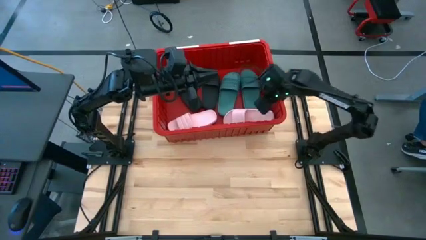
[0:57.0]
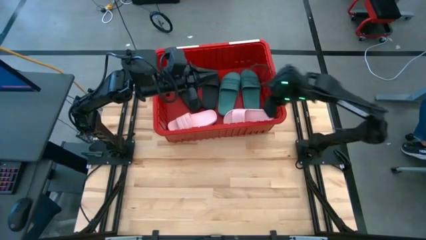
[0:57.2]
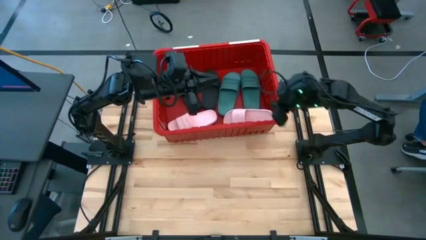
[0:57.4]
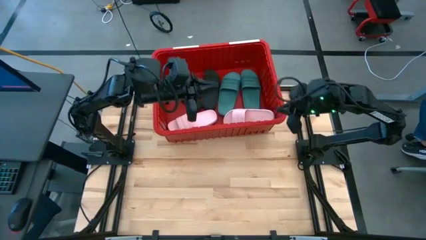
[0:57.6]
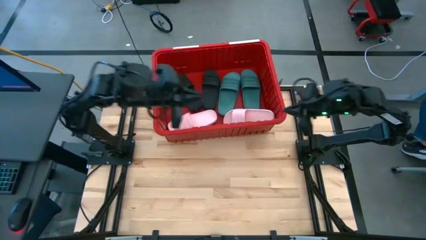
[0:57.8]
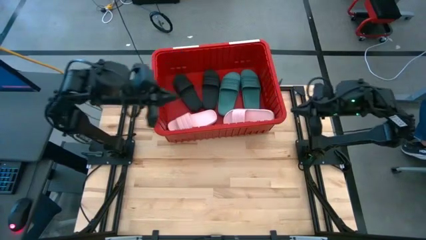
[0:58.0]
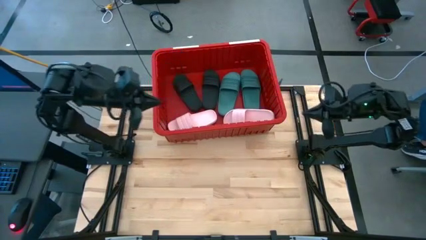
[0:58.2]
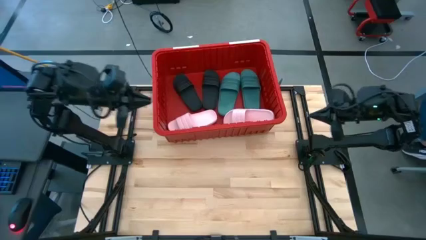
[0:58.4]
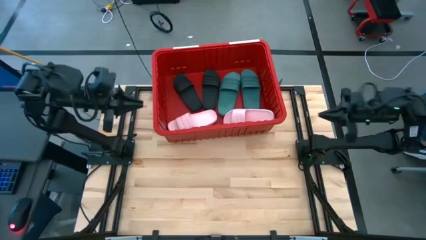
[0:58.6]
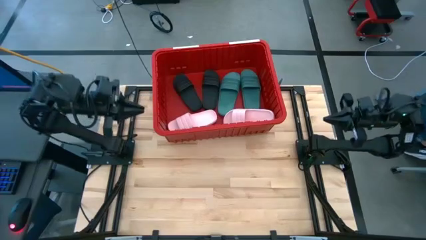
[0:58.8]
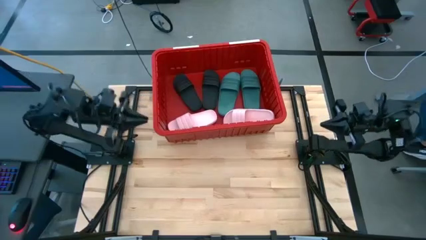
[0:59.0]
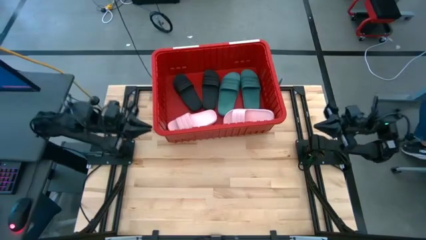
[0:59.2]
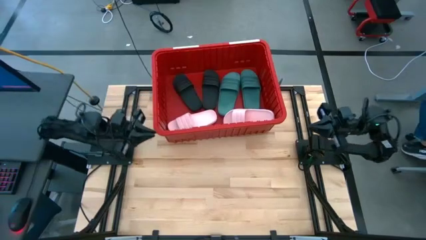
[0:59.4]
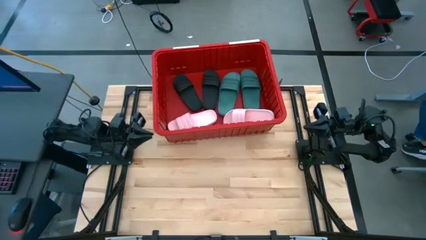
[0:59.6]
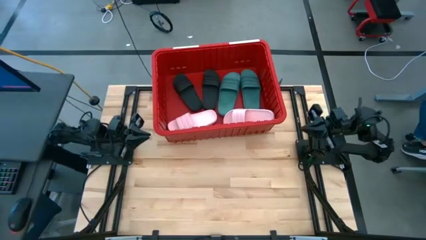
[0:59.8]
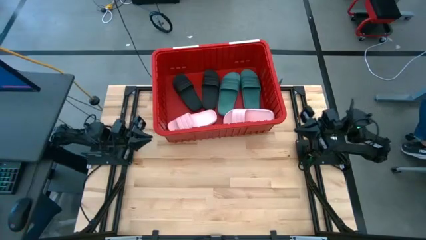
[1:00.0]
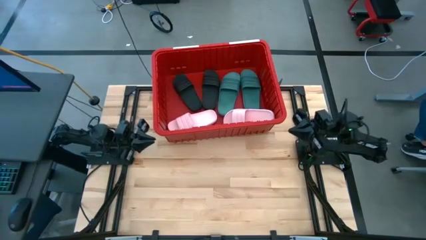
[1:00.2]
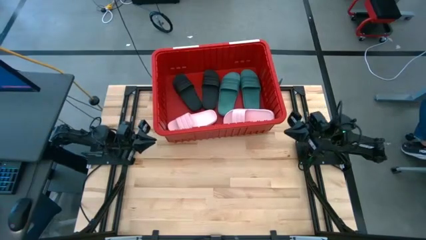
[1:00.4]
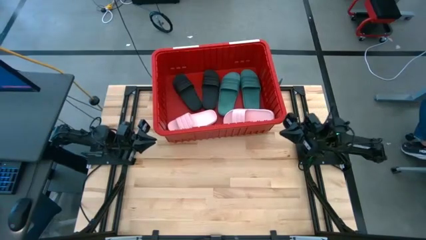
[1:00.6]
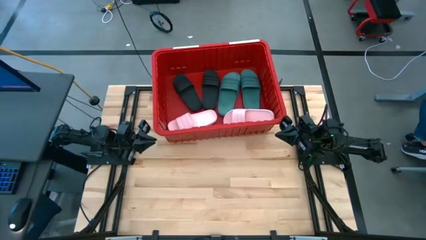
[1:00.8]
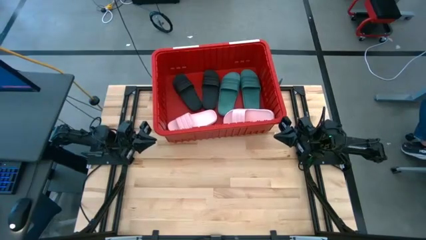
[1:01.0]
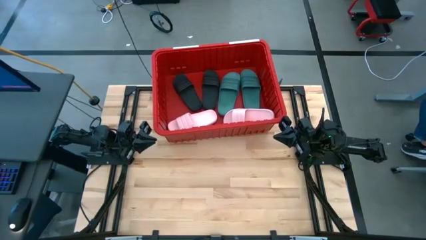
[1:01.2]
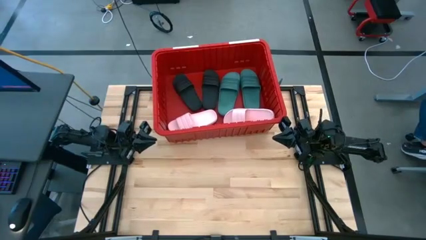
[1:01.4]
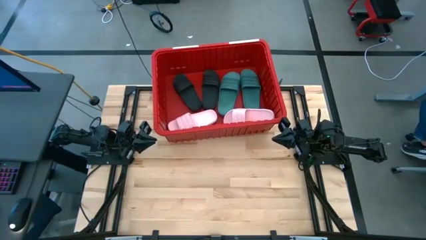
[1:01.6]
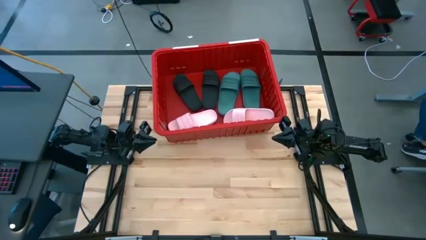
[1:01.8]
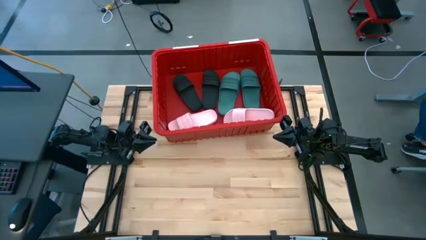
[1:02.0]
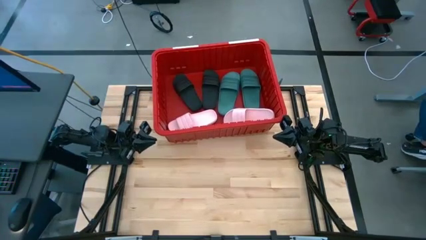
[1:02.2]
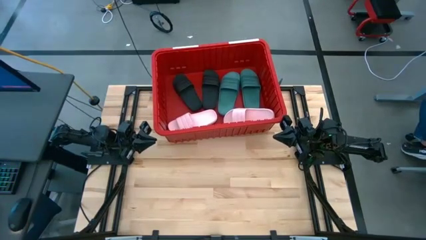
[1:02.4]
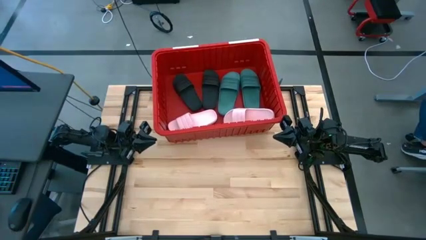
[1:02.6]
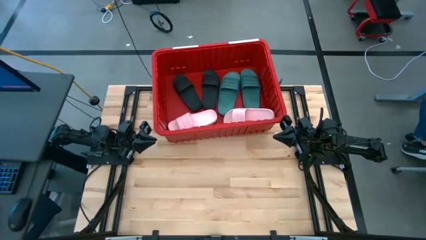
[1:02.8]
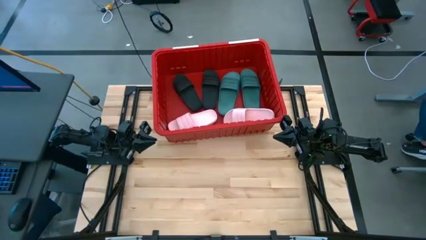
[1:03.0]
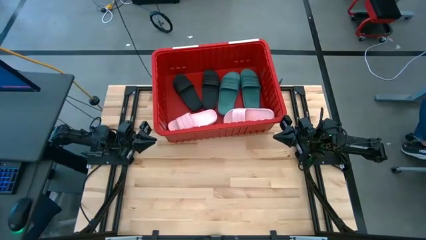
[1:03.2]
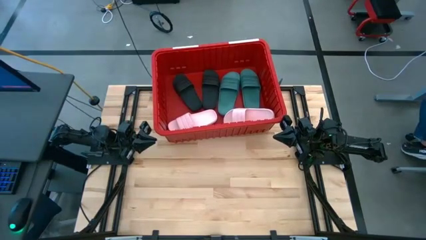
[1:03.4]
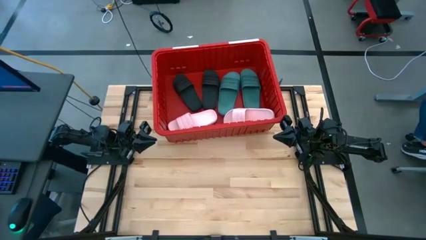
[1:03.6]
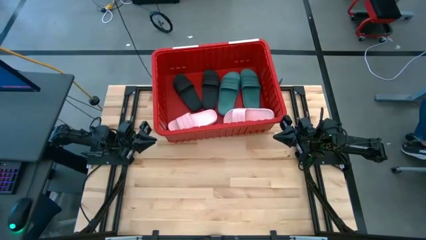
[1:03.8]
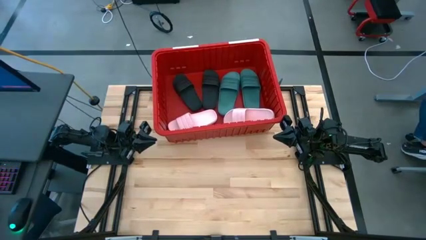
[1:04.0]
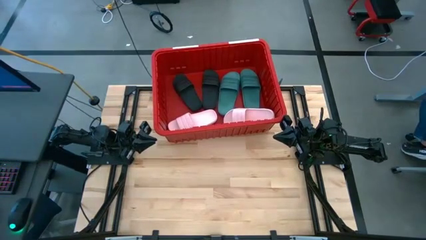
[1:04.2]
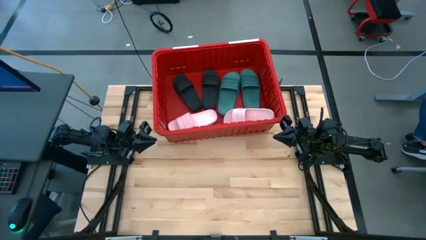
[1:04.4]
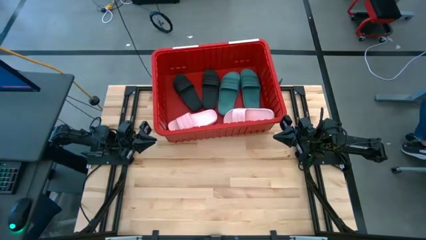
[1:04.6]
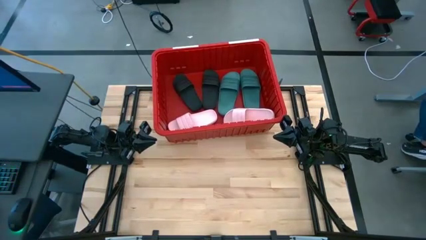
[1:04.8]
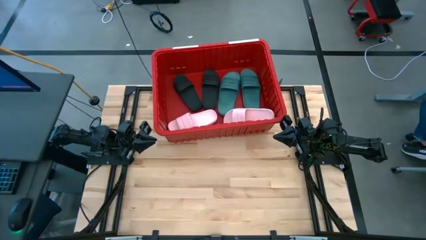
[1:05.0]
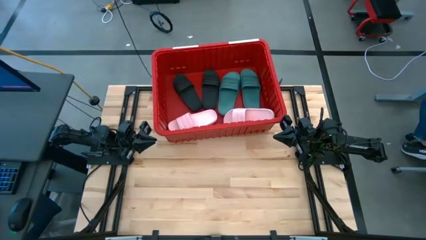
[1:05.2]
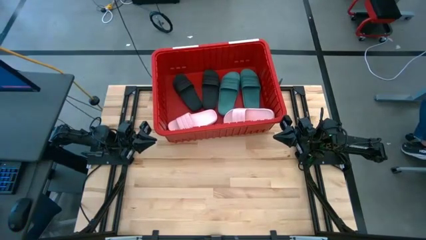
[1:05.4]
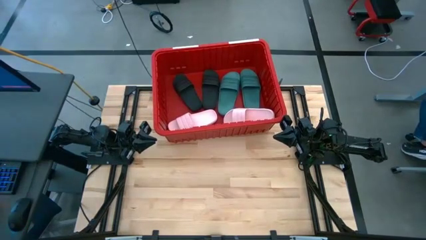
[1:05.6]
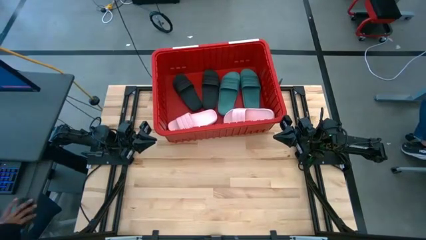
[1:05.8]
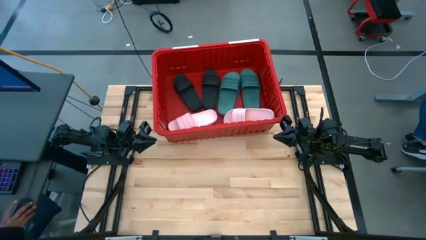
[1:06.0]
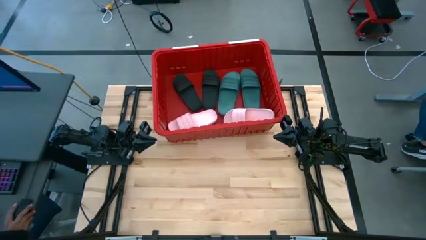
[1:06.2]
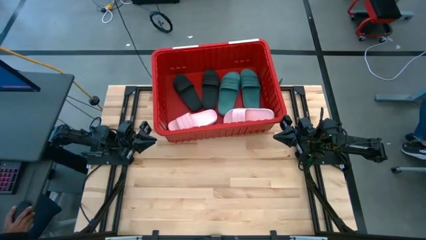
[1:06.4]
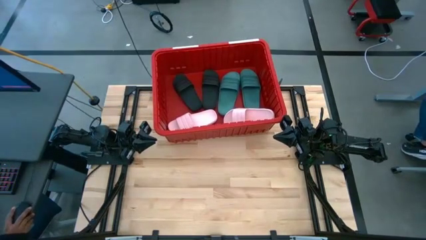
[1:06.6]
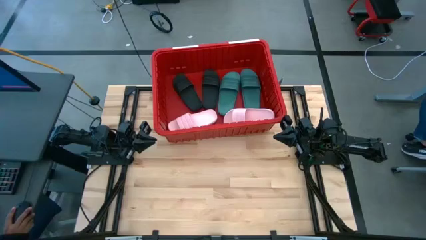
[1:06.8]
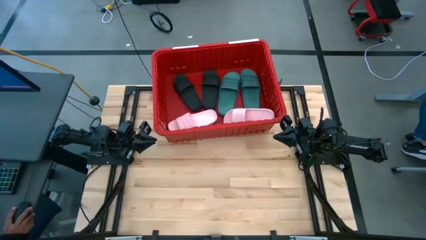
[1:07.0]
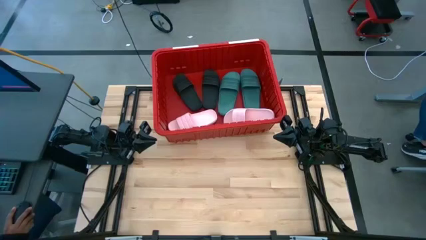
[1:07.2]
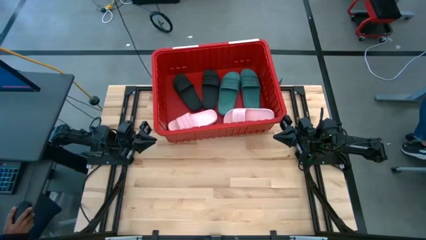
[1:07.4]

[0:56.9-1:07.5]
Task: Pick and place slides into bin
Return to Home Position

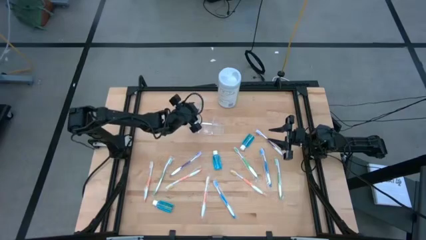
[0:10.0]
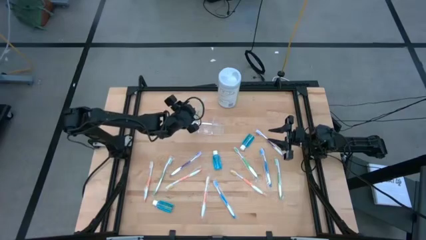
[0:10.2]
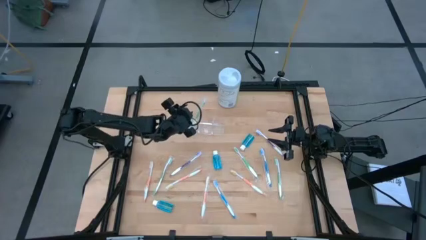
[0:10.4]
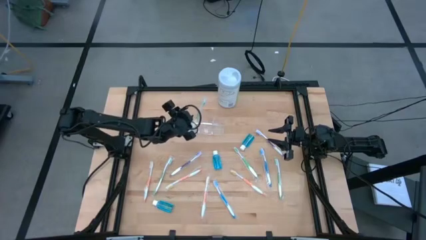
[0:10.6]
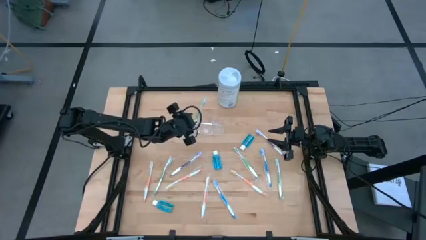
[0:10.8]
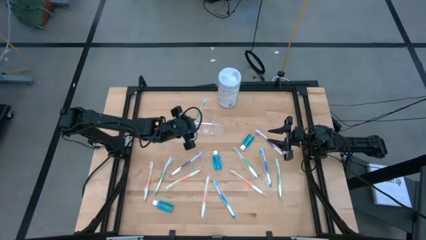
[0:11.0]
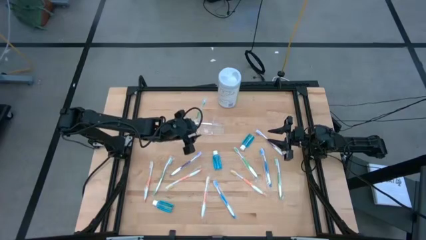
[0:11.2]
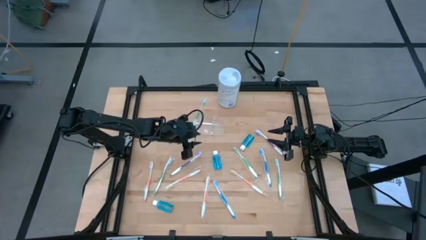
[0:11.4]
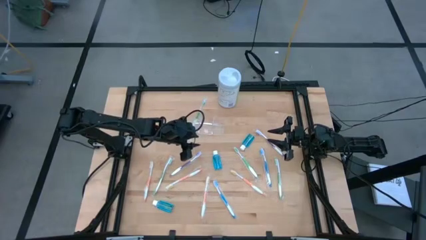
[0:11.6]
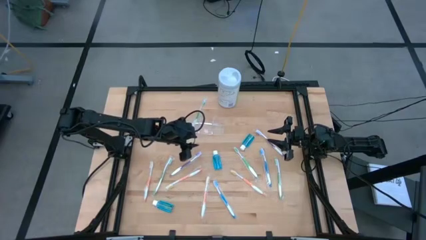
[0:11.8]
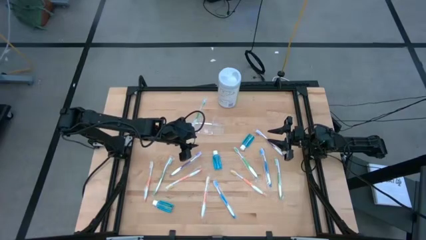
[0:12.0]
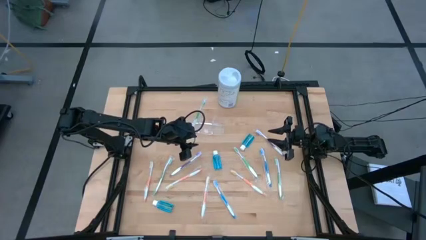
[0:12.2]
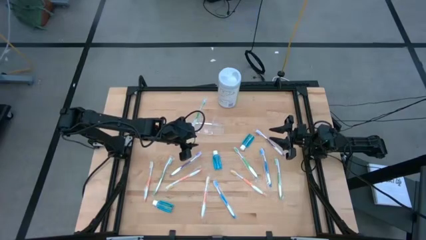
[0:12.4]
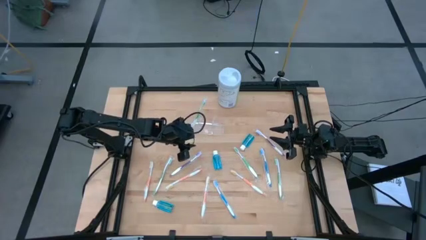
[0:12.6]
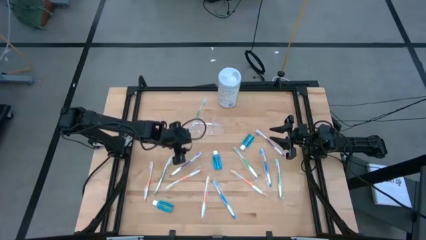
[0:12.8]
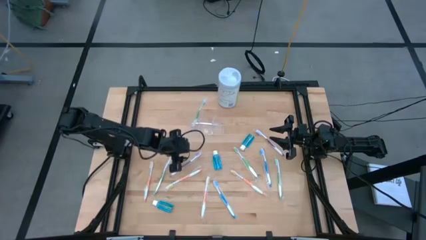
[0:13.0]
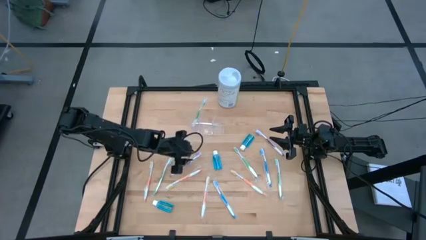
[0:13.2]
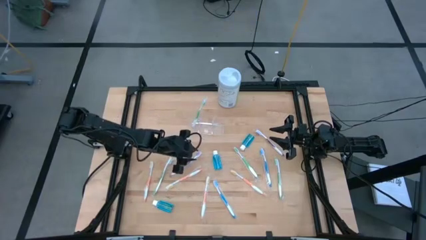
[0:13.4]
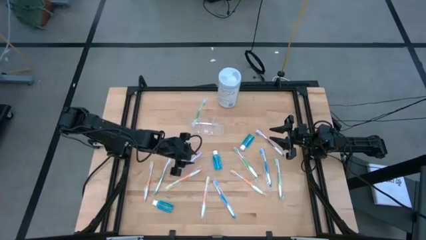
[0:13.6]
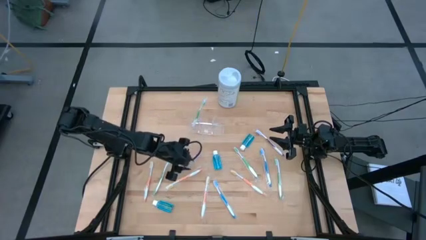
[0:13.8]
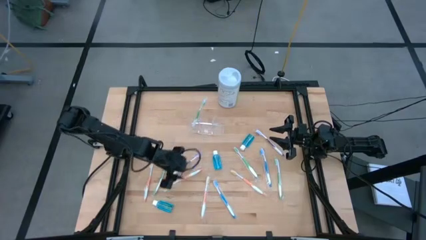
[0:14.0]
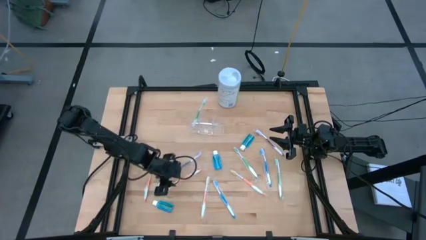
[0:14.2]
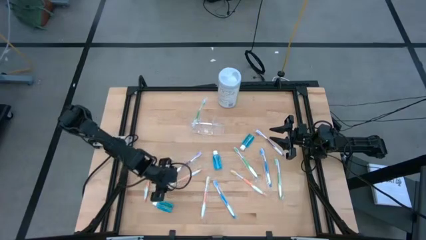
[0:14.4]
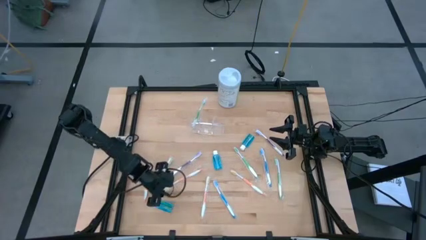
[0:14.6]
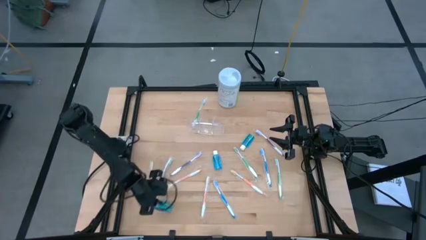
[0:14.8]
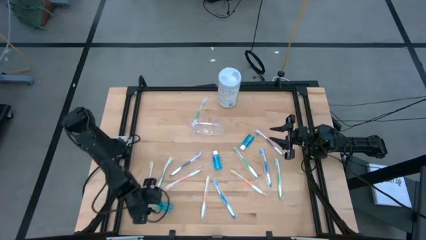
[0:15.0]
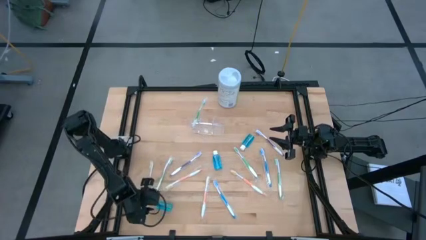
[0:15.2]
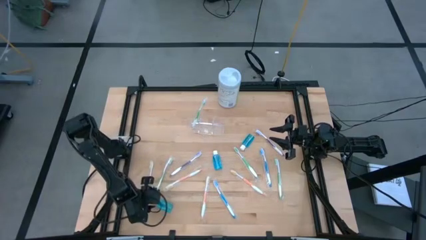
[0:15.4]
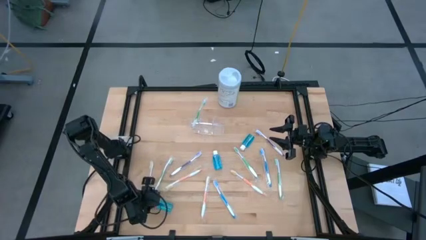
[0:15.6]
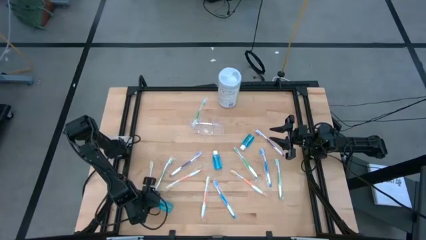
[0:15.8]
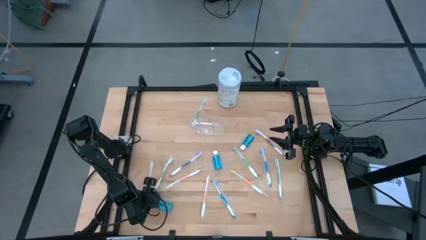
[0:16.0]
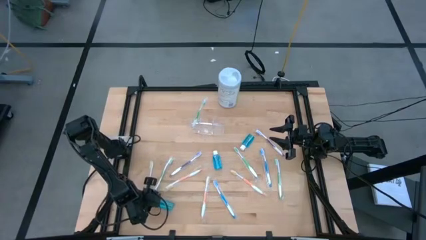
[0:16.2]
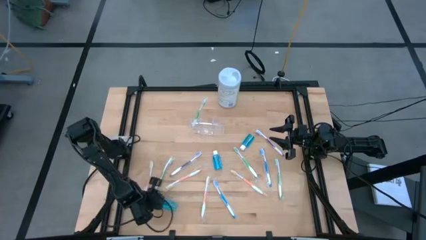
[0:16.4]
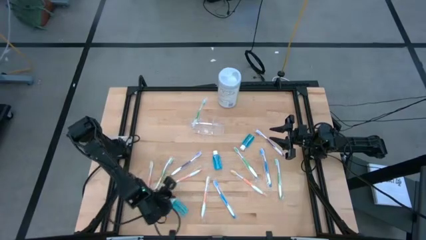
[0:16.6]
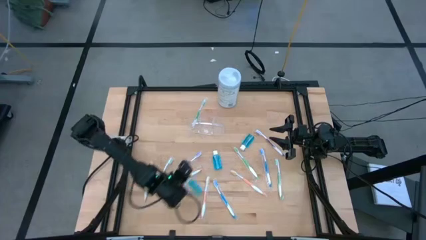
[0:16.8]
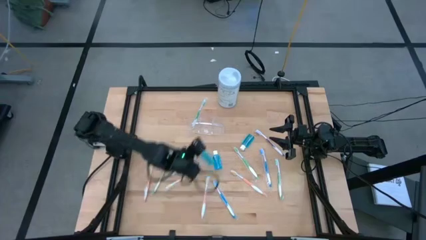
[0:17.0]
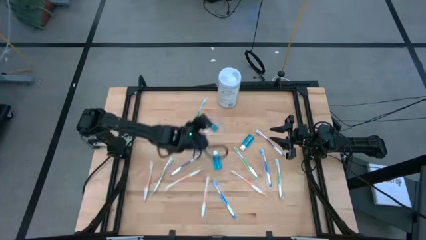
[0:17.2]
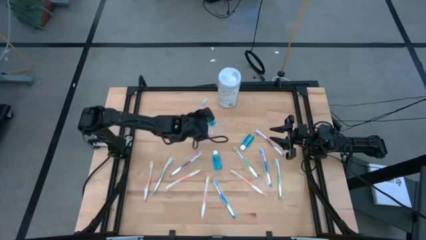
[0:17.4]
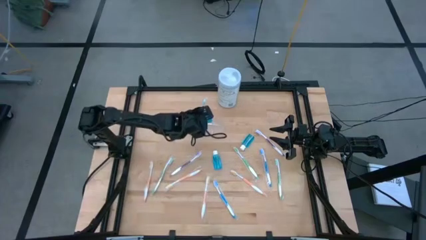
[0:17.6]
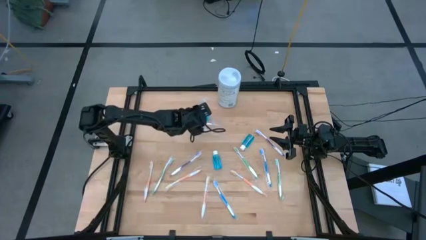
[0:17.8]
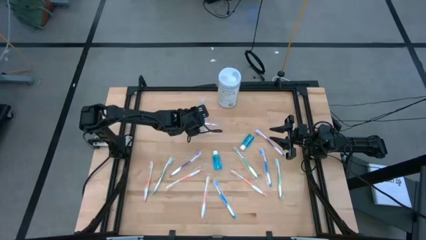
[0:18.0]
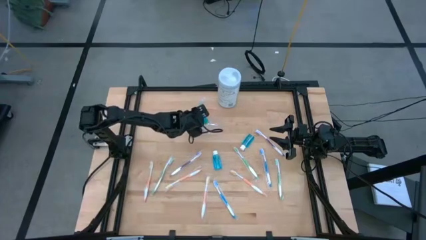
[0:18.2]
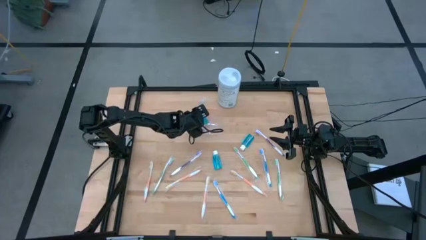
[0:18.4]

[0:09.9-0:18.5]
Task: Pick & Place toothbrushing station
Put the blue mouthwash into the transparent organizer
